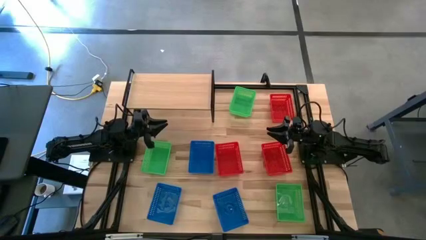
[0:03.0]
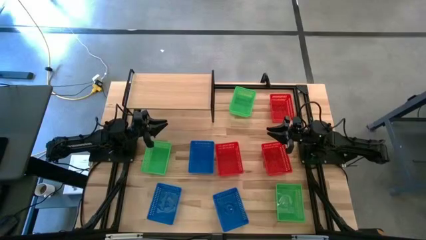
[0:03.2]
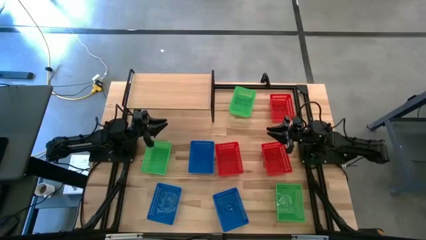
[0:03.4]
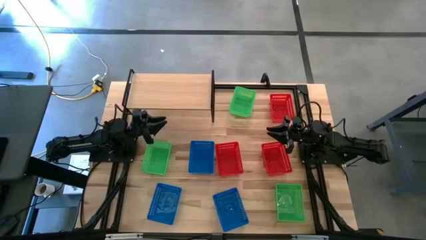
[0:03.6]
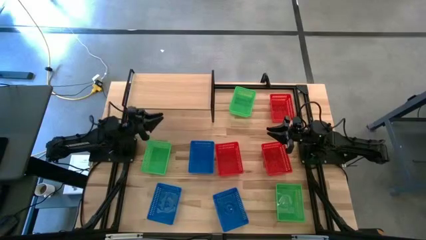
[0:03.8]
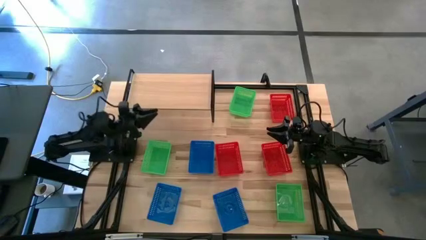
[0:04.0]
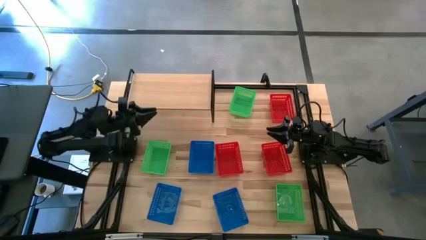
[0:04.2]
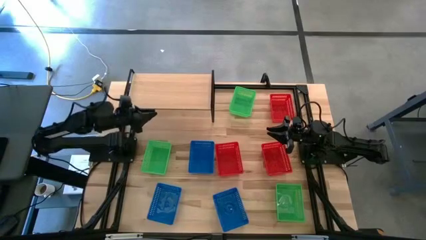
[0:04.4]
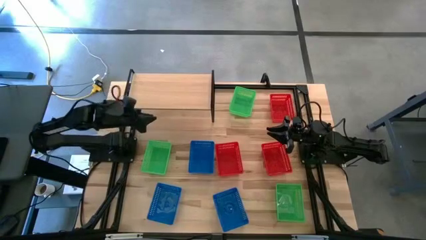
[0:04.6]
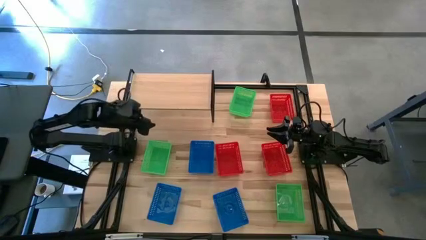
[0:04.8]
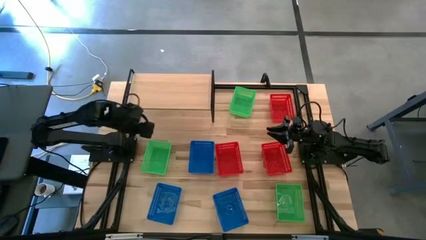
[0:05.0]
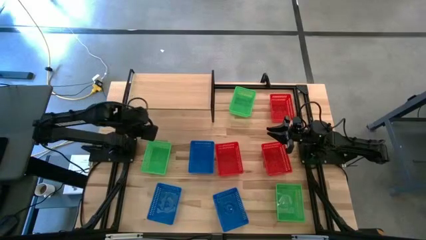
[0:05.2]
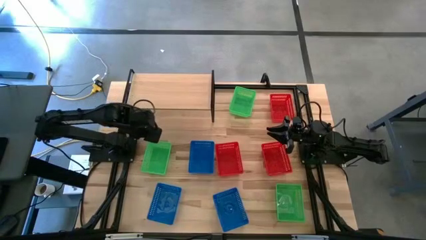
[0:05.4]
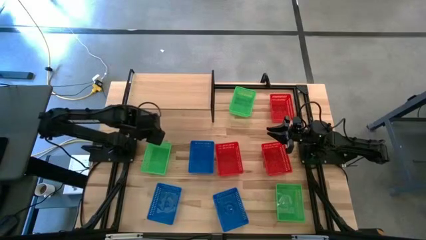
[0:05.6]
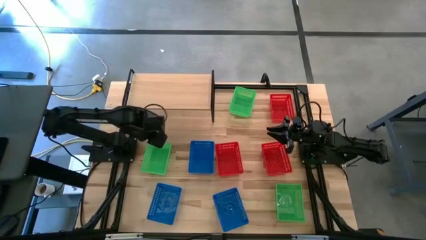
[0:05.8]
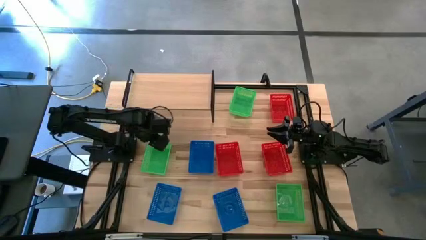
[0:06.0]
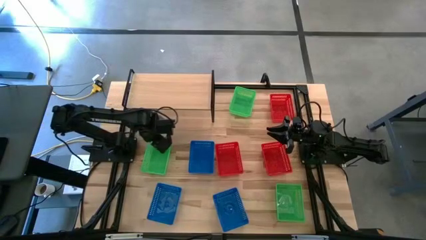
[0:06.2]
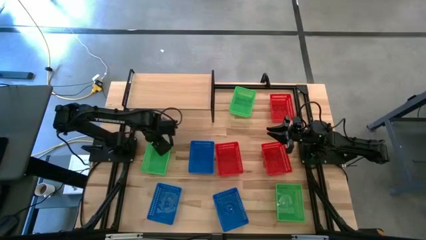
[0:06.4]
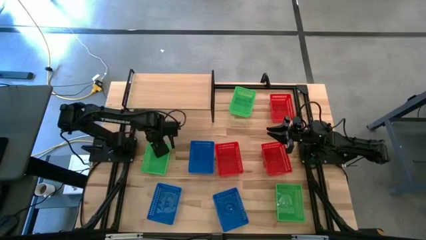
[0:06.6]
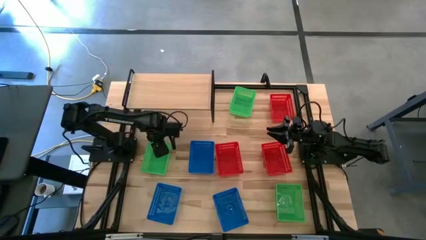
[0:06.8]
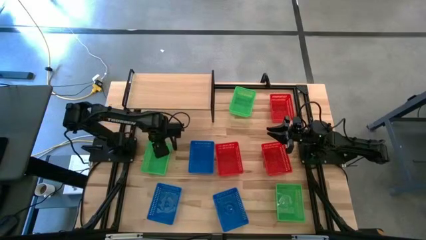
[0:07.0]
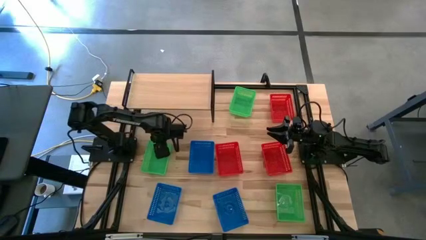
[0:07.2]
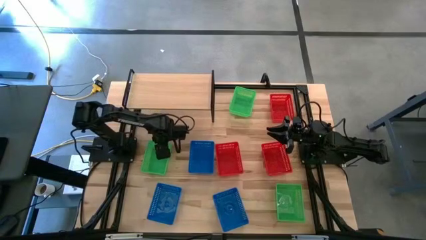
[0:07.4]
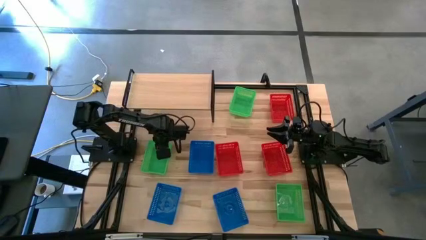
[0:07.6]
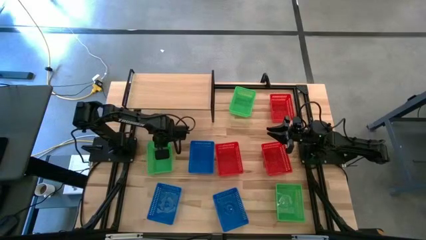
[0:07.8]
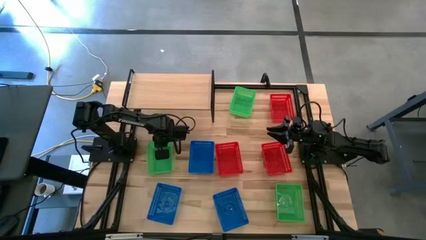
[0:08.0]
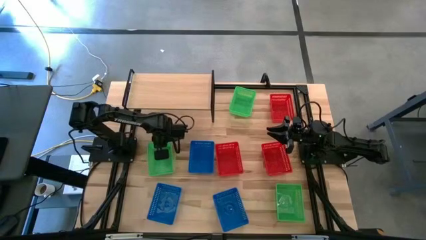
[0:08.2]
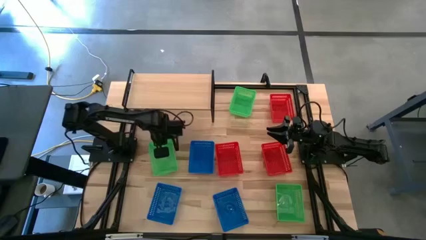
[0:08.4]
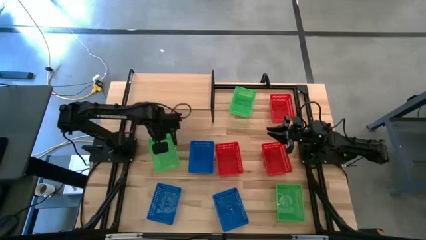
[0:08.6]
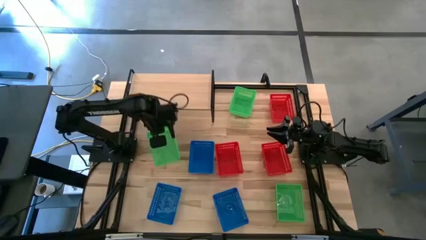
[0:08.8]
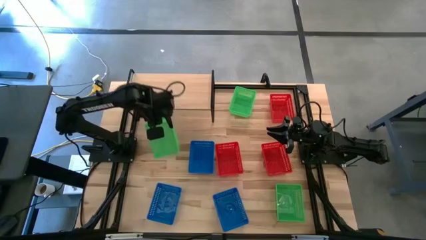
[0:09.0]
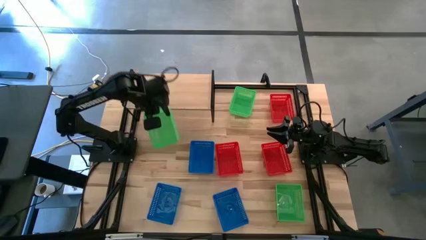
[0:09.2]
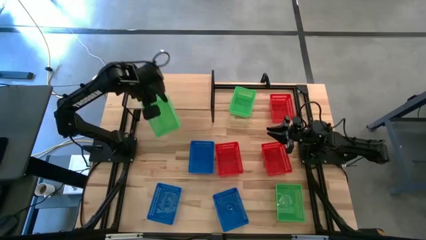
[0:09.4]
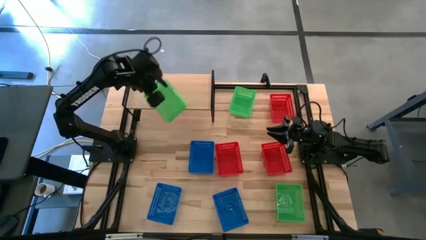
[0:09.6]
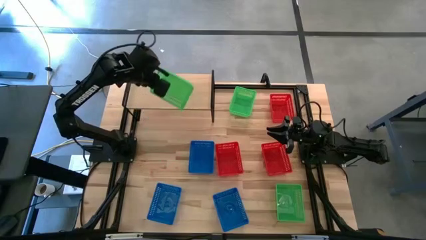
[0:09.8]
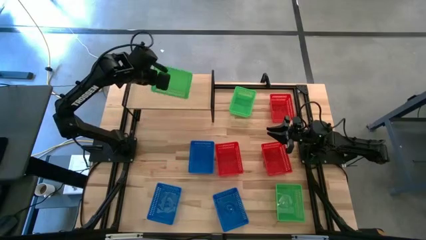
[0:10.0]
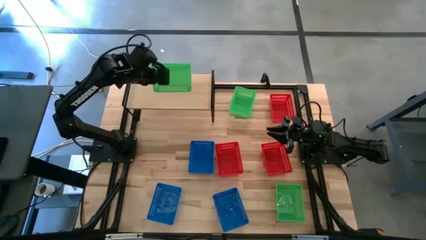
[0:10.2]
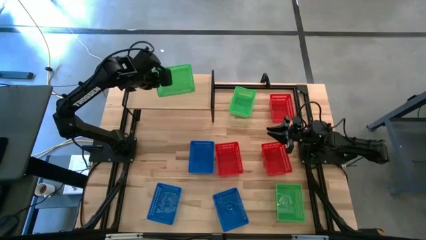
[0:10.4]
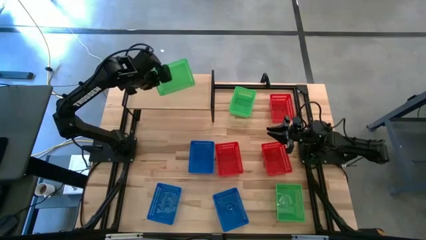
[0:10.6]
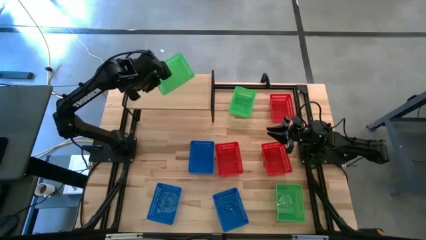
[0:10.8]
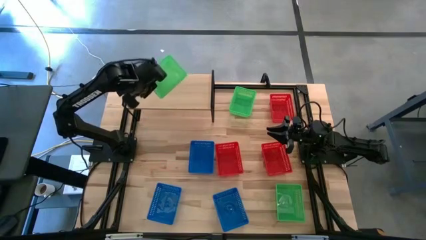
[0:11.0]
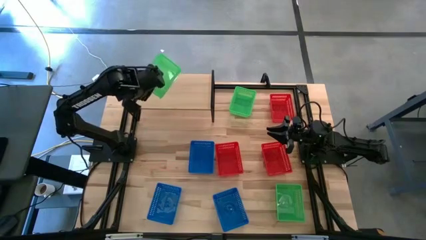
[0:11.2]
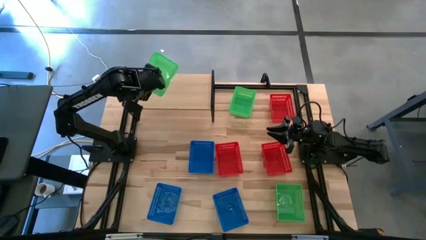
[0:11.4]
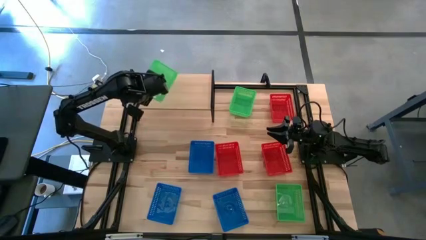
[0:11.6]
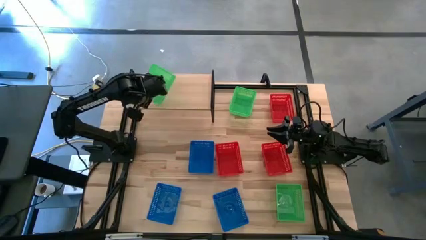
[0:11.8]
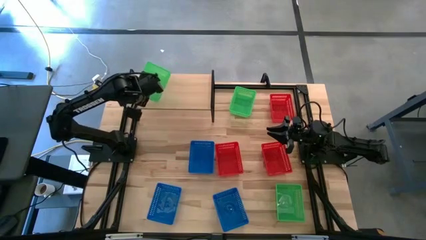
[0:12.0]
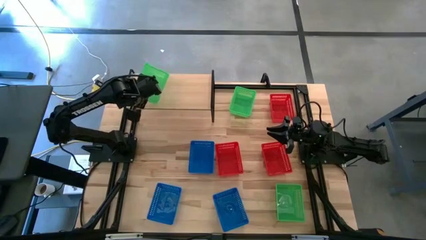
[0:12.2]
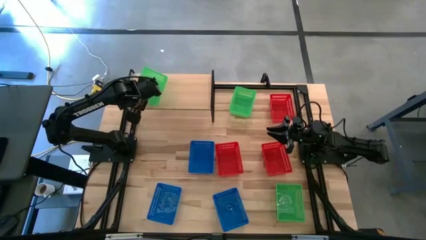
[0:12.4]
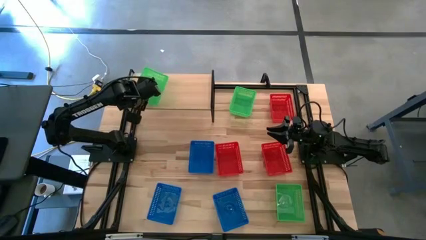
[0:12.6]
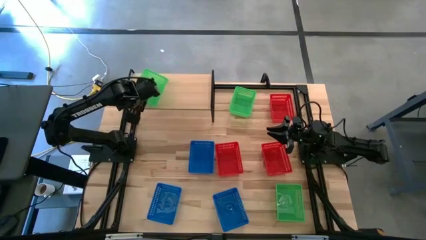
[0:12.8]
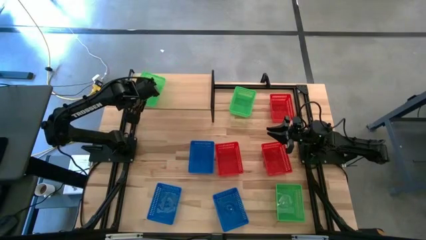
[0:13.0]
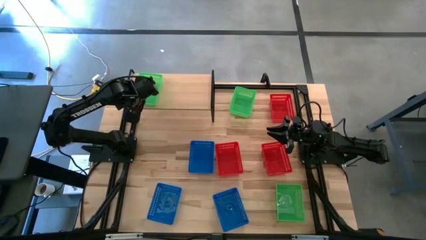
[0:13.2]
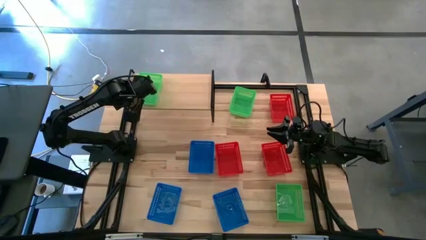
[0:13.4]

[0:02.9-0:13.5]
Task: Stack baskets on shelf by color
Put the left green bin on the shelf

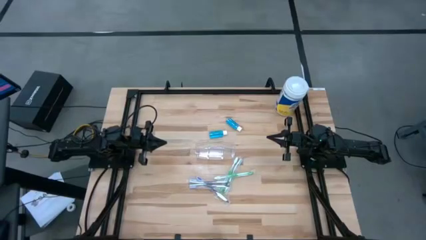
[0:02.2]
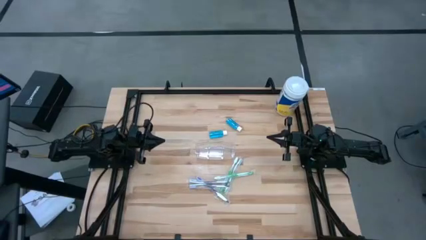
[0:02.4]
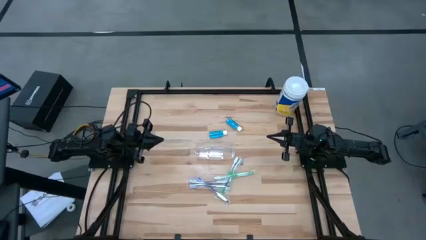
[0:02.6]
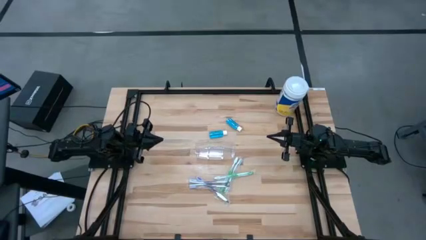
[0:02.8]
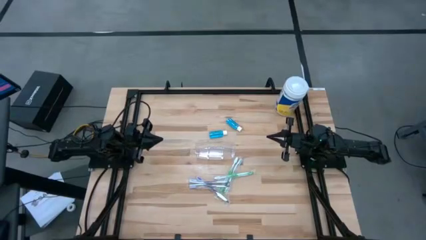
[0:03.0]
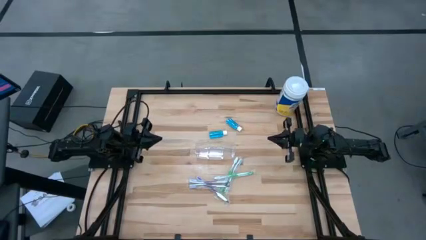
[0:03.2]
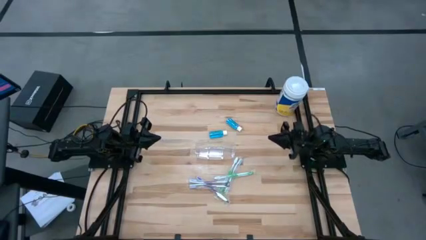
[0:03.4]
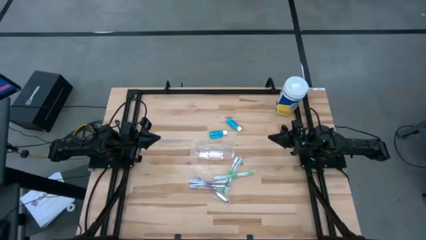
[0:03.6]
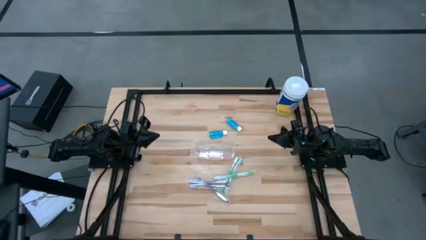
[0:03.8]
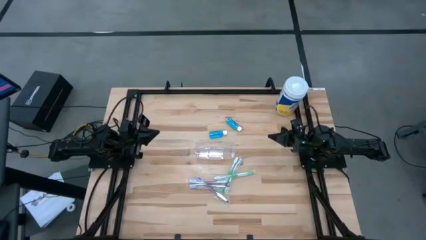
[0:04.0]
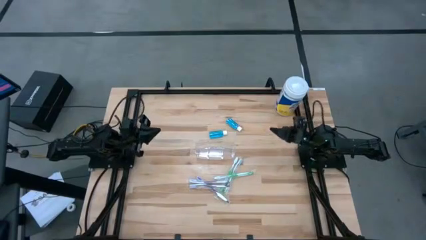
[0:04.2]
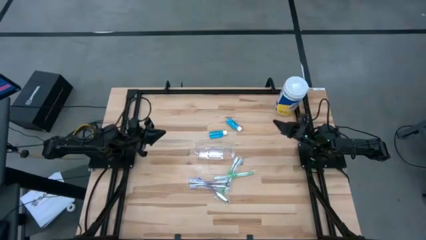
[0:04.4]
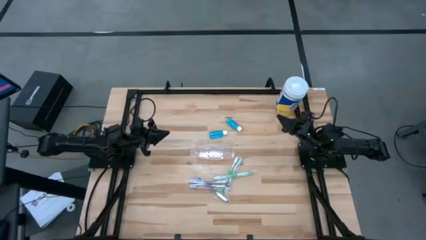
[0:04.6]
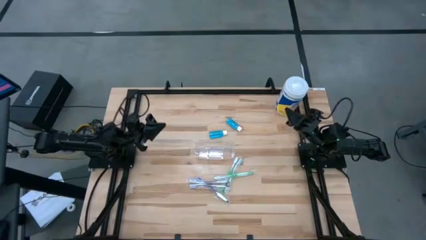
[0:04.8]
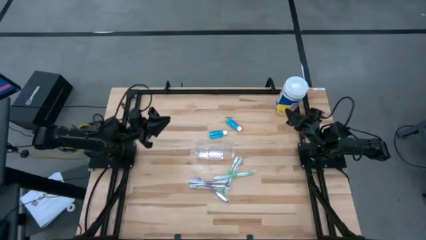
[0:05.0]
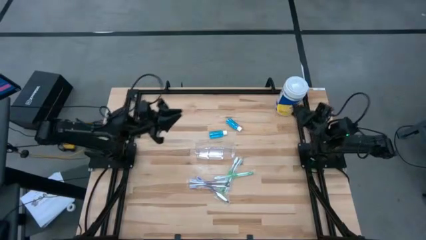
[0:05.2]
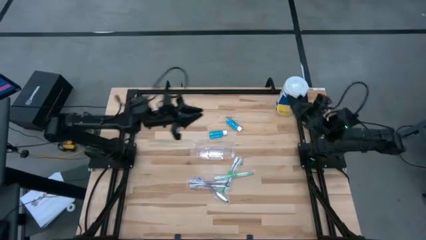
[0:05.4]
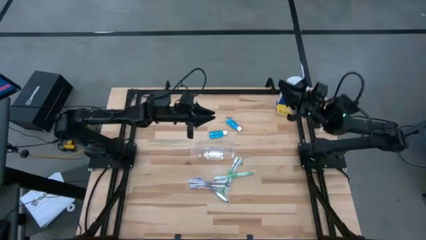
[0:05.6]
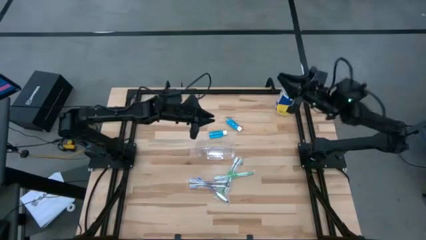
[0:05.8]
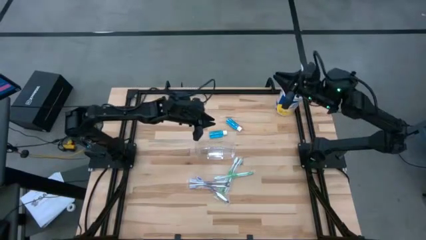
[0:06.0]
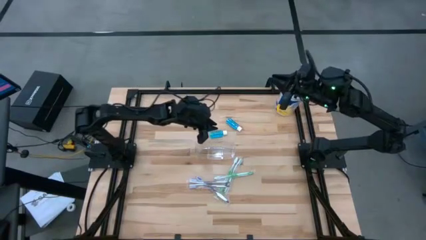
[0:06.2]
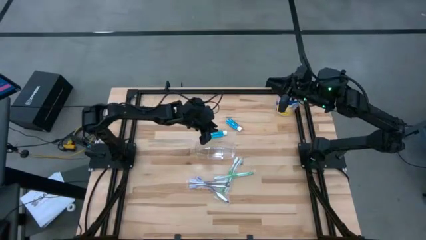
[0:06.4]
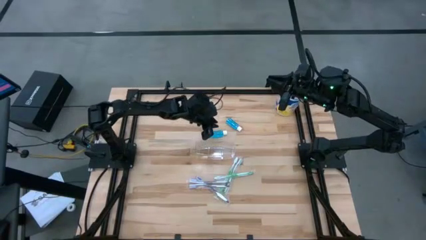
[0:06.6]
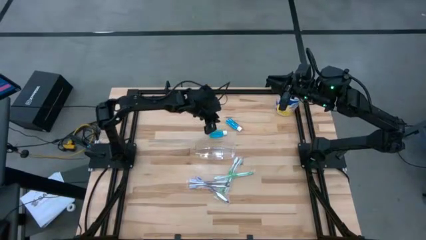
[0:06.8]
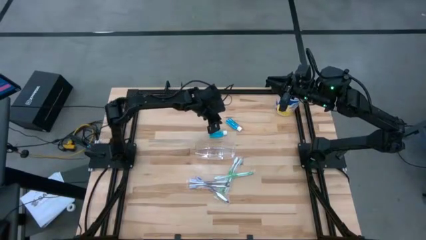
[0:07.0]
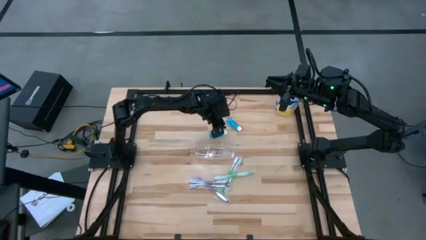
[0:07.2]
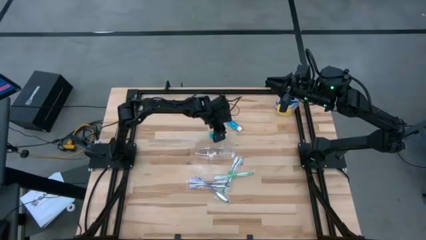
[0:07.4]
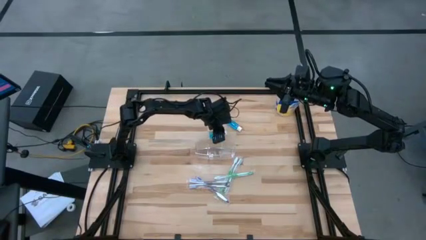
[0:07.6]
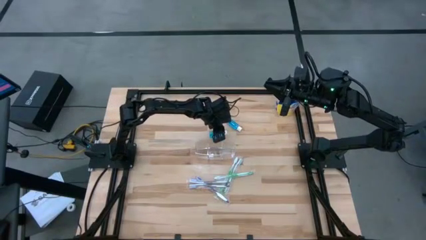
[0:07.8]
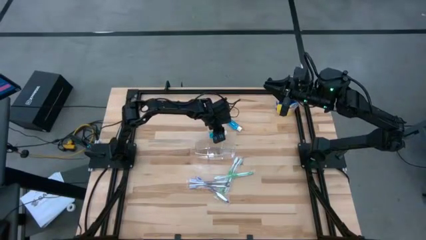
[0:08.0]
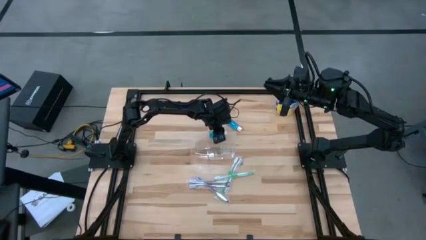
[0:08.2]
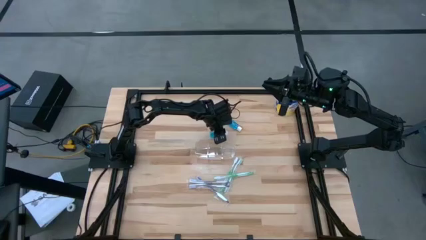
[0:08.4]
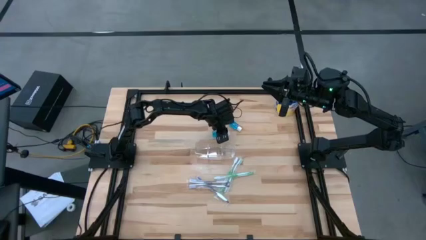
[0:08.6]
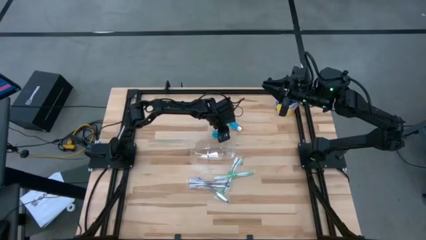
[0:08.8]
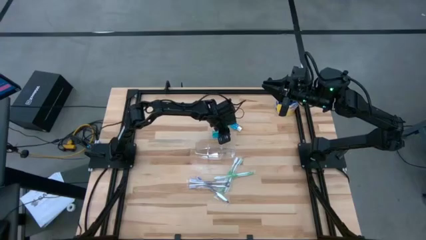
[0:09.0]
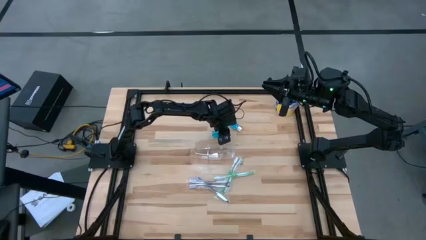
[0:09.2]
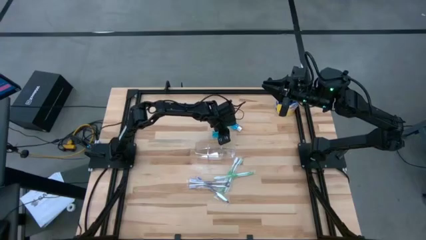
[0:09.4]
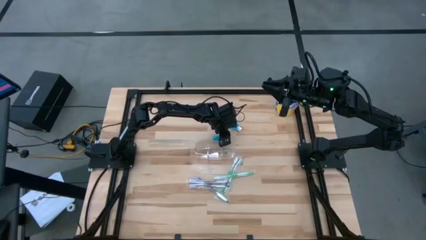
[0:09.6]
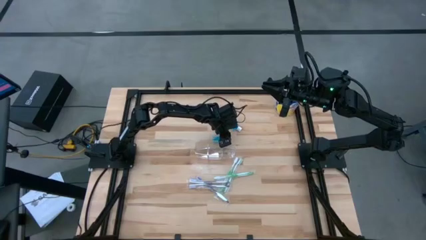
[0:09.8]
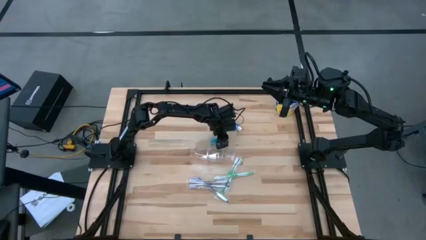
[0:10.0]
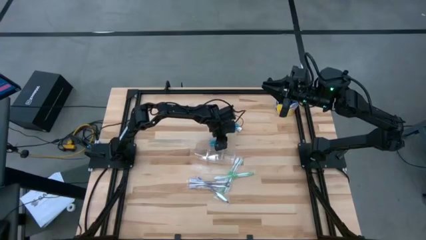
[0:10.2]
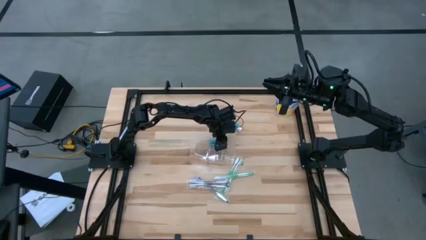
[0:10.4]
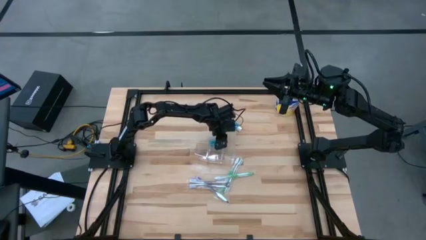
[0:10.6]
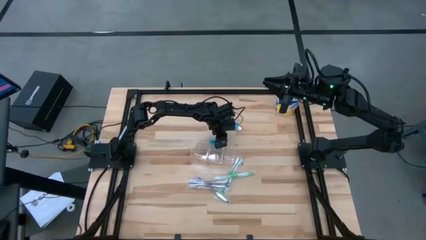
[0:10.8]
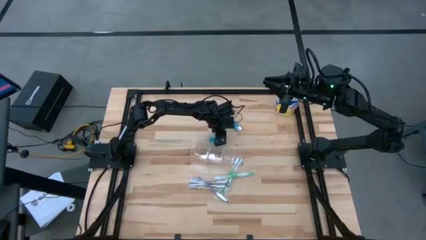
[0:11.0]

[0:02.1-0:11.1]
Task: Pick & Place toothbrushing station
Put the bottom blue mouthwash bottle into the transparent organizer
